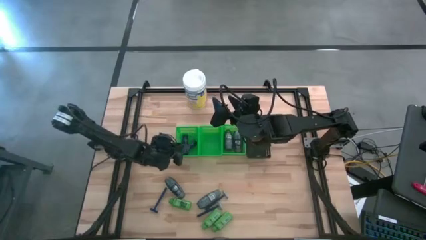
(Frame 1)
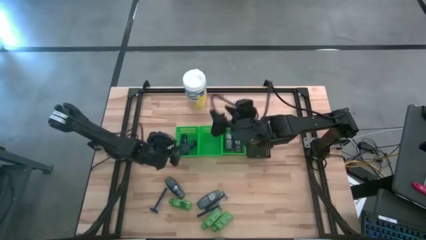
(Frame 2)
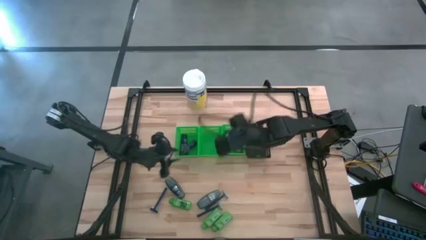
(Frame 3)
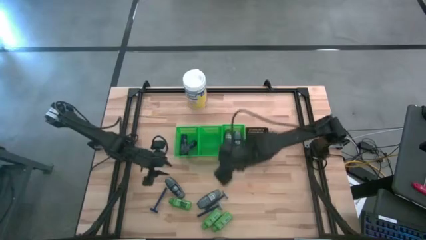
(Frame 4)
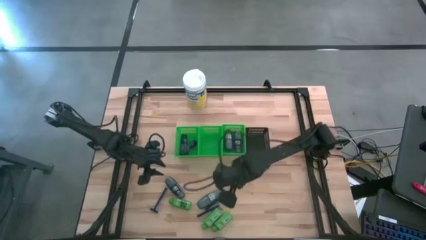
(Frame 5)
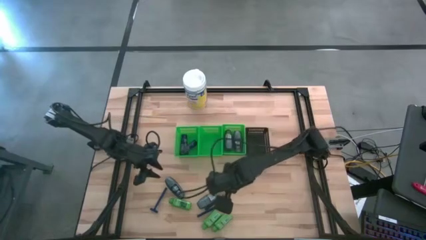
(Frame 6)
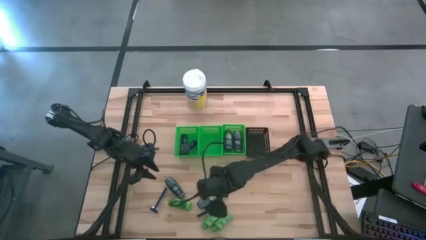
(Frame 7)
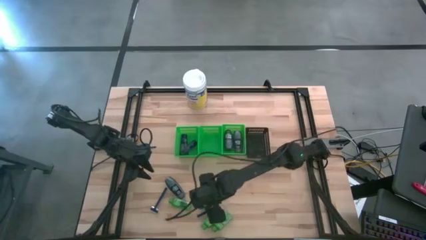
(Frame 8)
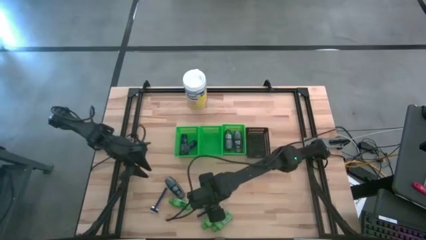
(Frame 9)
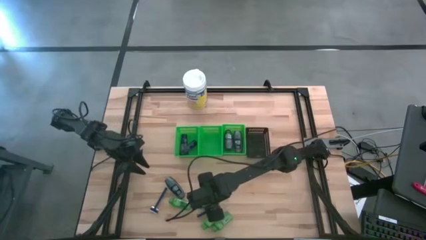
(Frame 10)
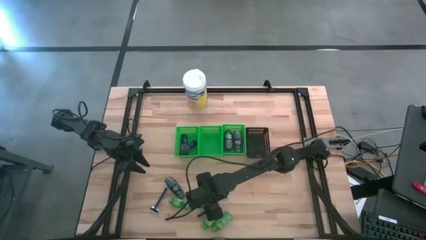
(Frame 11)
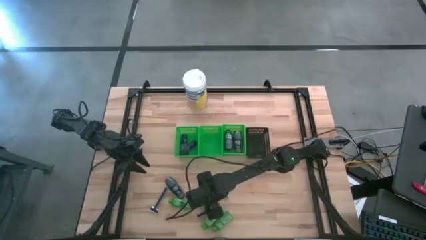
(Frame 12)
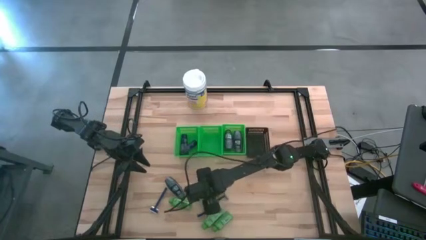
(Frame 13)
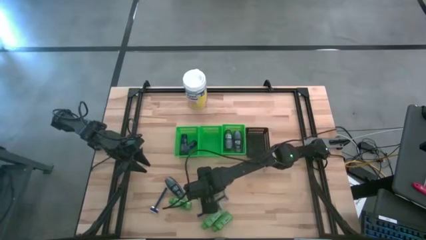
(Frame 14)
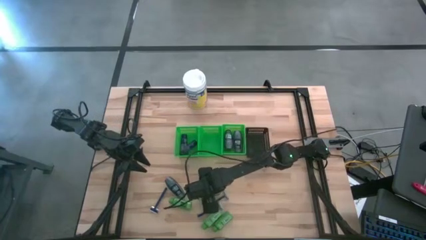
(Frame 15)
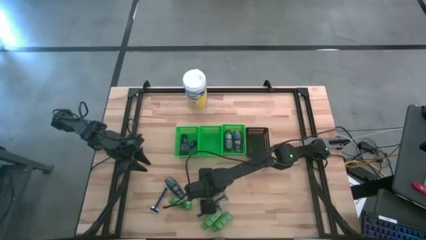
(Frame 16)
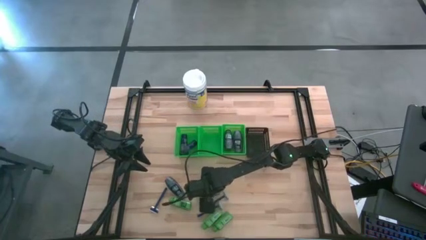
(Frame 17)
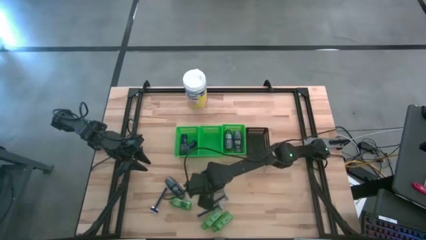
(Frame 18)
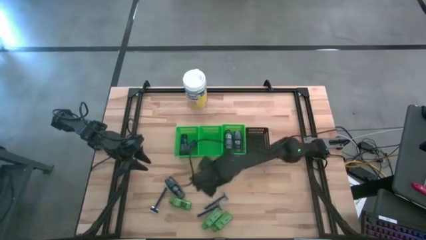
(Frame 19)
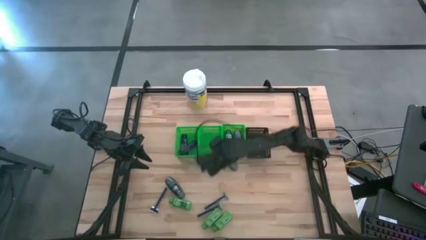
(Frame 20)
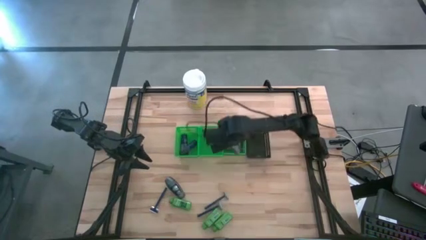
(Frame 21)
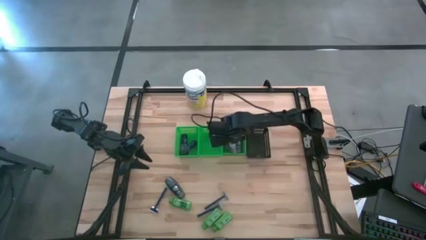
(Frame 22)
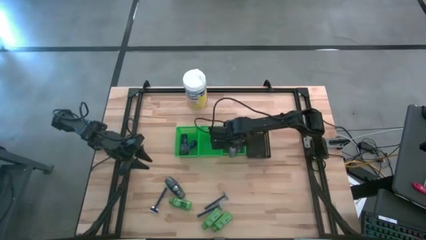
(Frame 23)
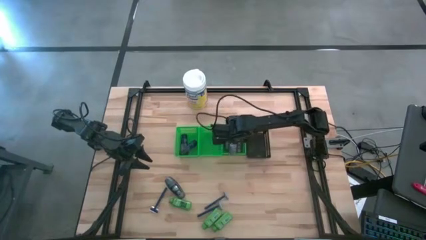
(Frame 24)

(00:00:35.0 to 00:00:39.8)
Task: Pick & Place Travel size toiletries
Put the gray roller bottle into the right green bin

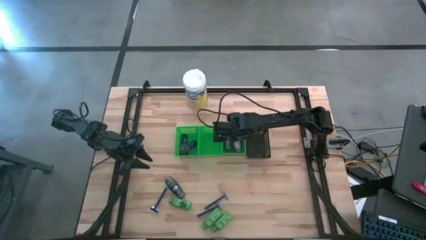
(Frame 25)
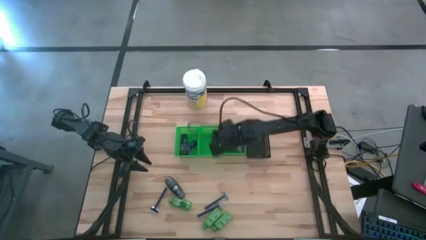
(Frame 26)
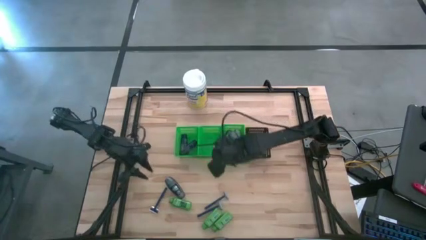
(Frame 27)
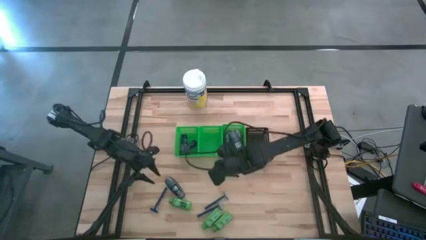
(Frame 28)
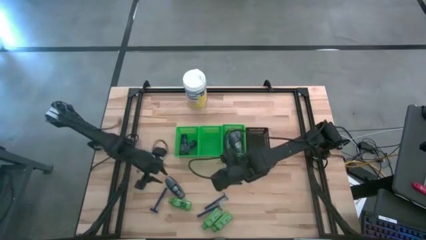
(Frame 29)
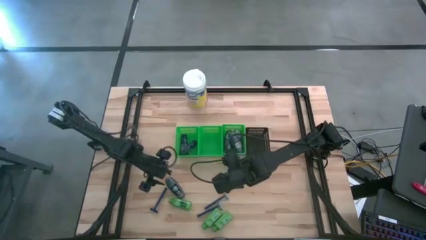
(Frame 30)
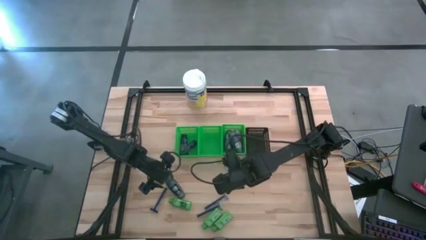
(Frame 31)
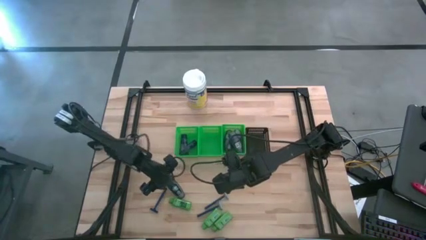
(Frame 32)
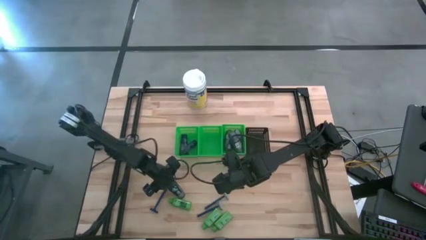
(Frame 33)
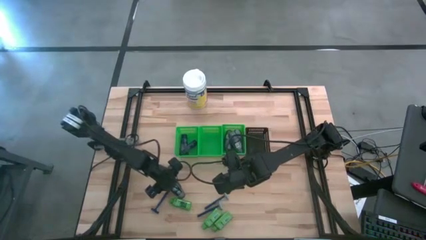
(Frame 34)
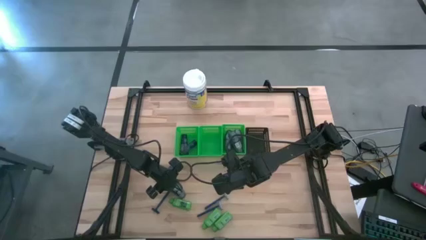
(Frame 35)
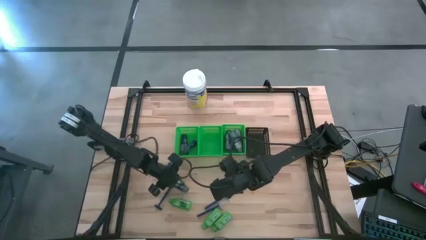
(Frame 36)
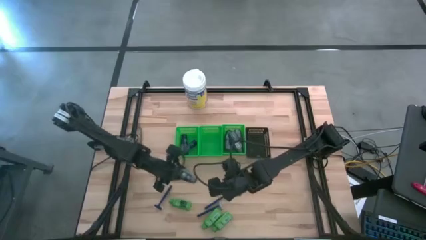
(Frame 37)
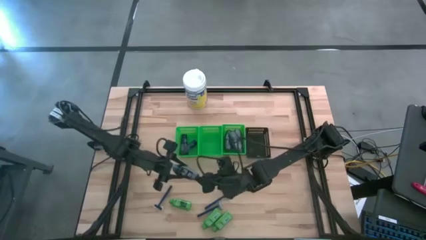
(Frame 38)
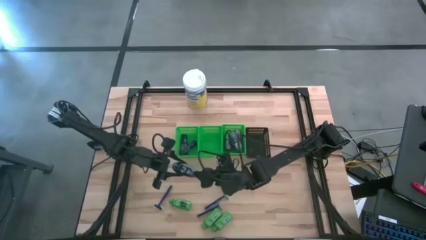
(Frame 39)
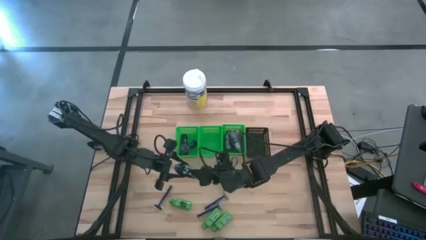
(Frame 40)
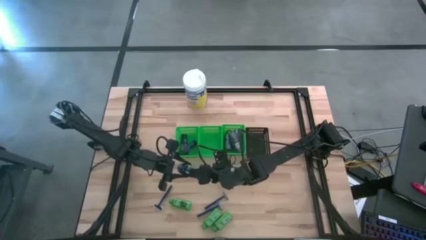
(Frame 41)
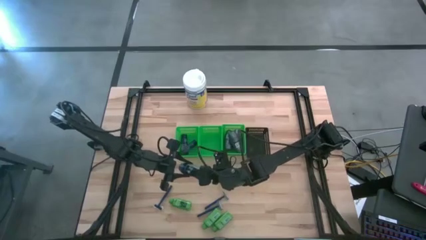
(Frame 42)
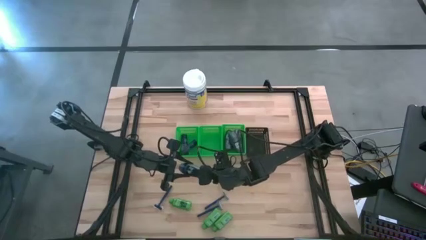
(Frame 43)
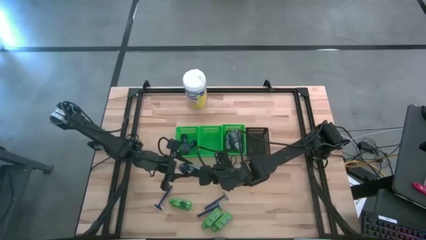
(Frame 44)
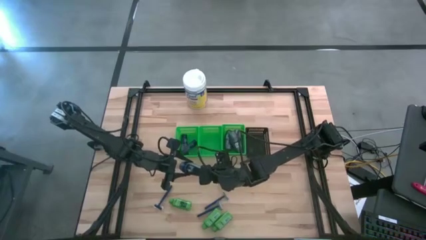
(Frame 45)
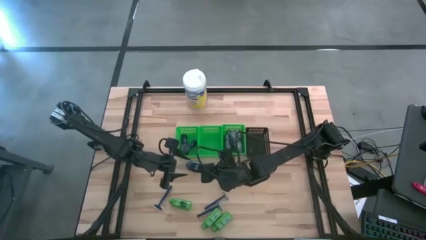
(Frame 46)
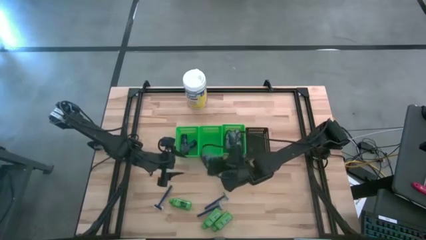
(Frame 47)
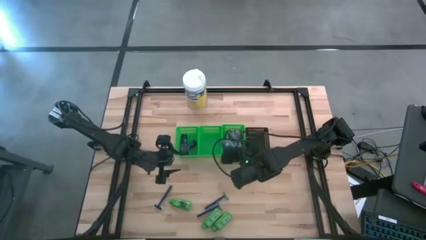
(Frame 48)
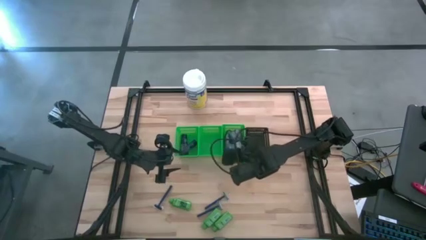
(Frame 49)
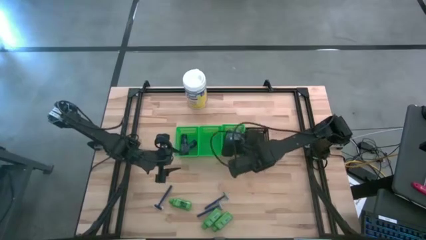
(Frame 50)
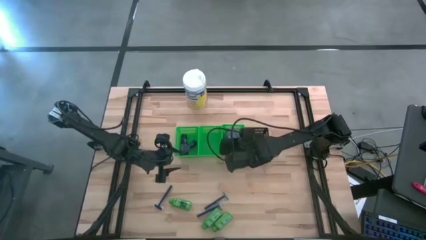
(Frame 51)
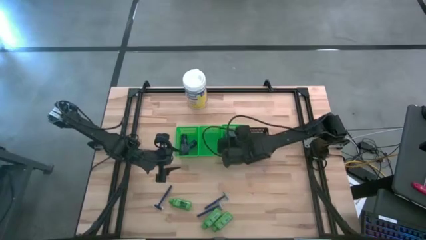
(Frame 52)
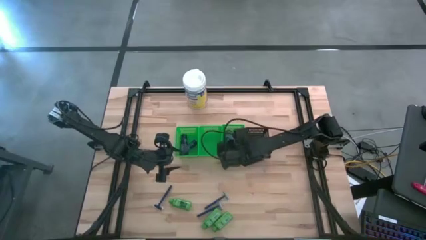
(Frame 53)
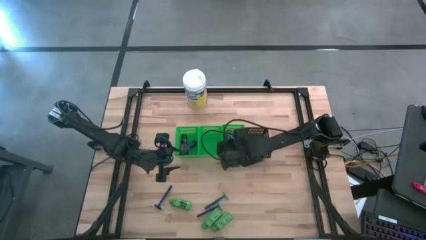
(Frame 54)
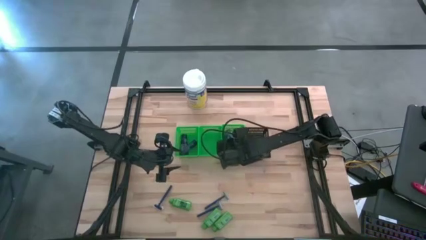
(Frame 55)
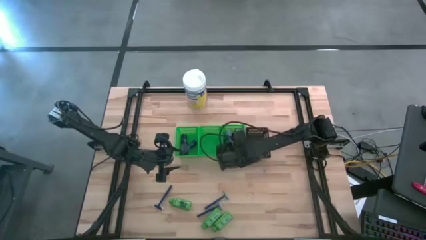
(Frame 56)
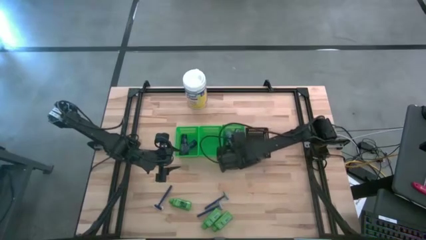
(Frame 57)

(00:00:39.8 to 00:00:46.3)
Put the gray roller bottle into the right green bin

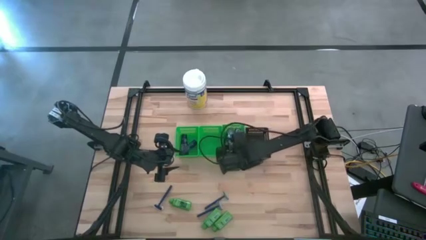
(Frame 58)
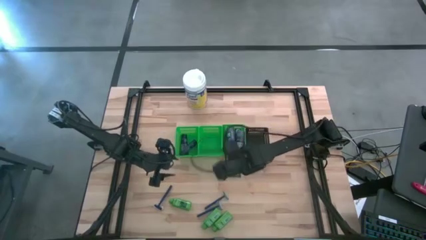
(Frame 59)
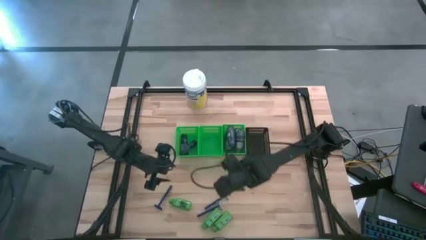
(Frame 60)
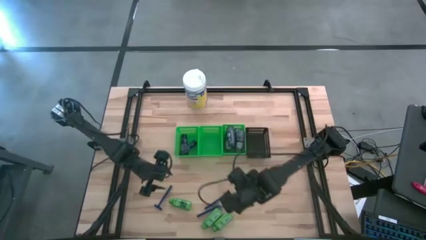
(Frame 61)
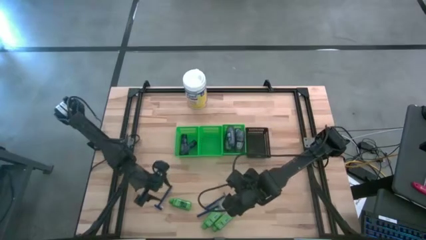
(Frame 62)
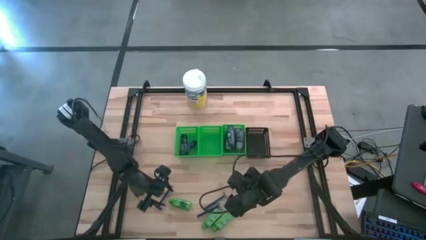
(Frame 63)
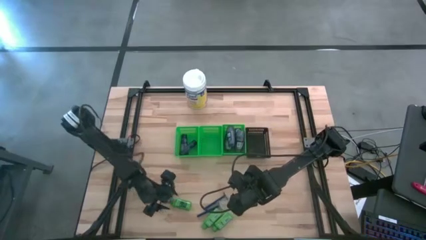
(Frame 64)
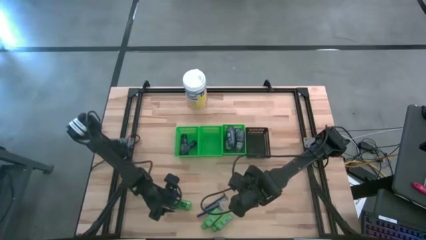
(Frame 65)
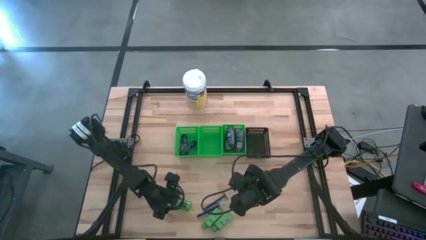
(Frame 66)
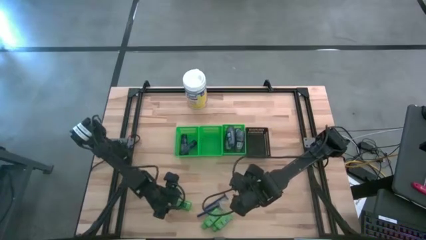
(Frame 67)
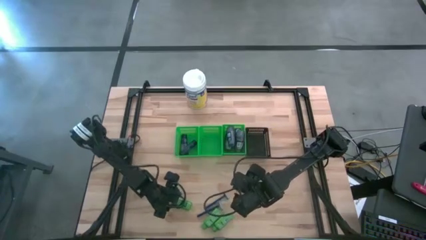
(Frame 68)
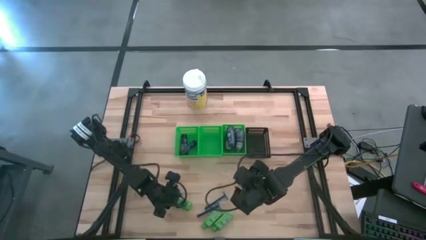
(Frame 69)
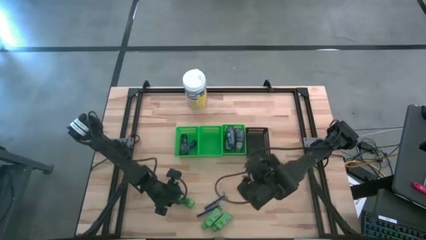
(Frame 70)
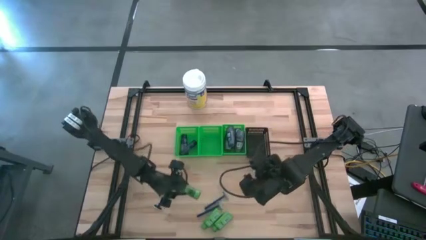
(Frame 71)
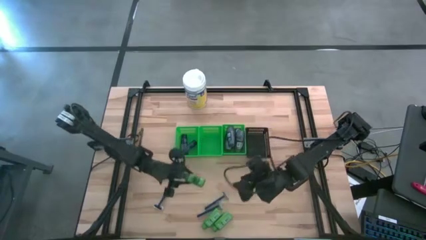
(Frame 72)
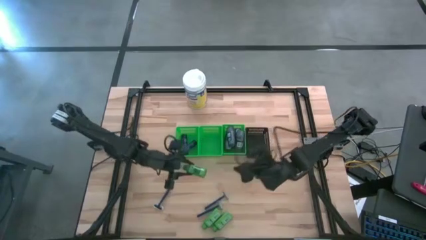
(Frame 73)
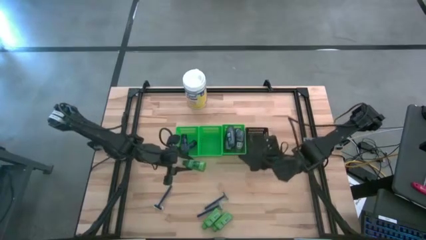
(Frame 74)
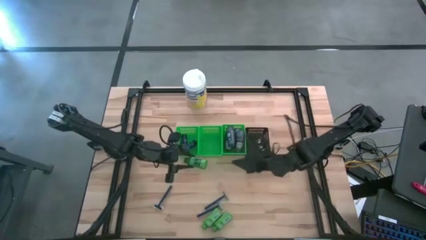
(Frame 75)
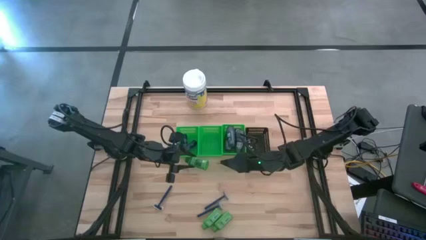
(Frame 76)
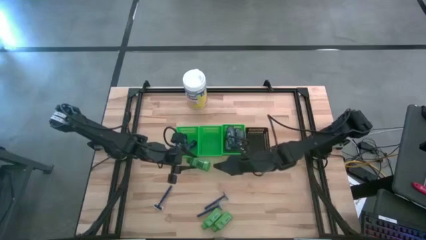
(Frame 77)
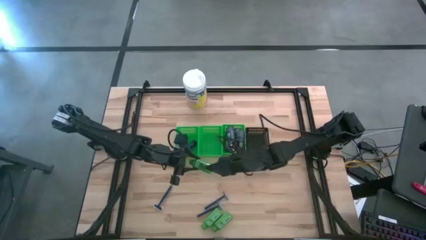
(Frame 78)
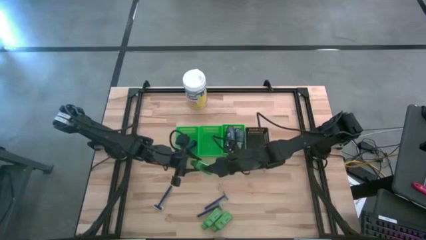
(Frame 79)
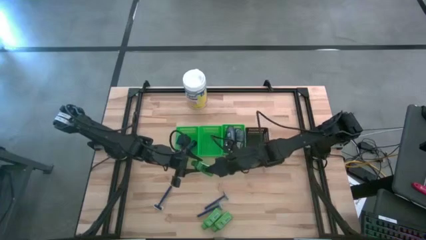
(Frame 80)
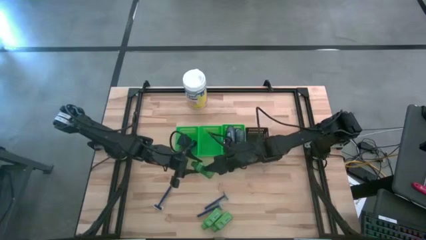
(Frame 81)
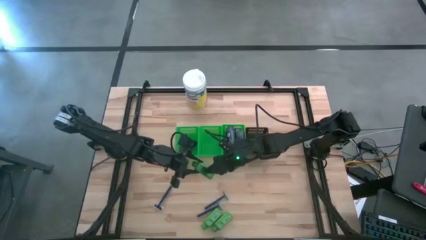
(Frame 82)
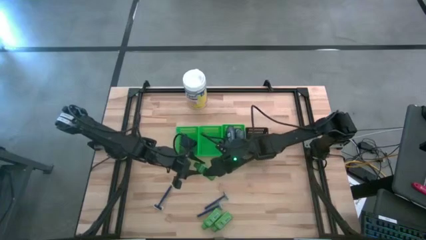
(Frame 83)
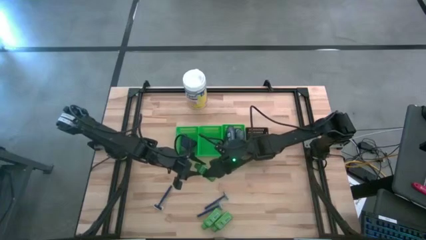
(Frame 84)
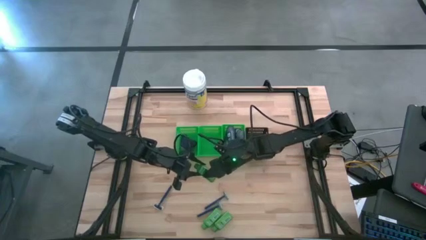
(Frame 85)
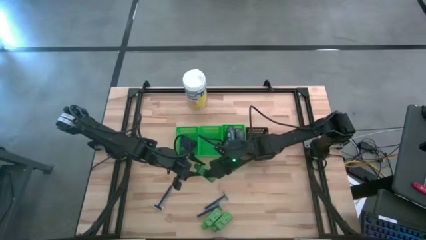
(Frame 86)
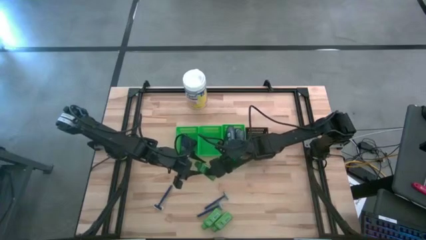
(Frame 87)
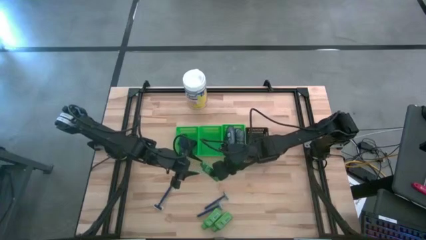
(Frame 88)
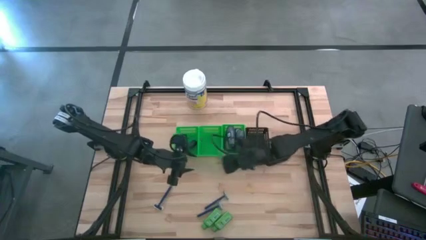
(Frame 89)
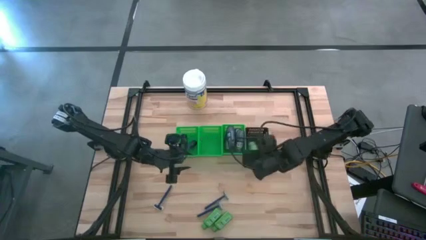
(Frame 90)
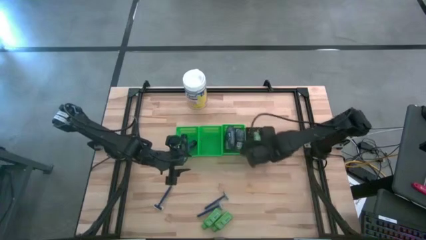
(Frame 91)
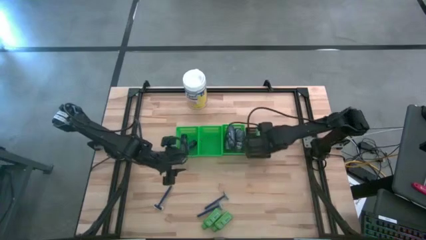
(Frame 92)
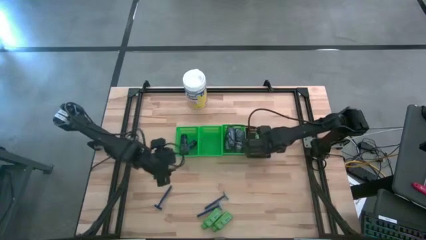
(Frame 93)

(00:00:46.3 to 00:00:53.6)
Put the green shampoo into the black bin
